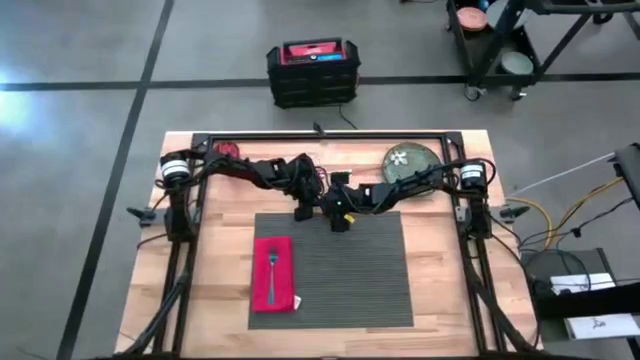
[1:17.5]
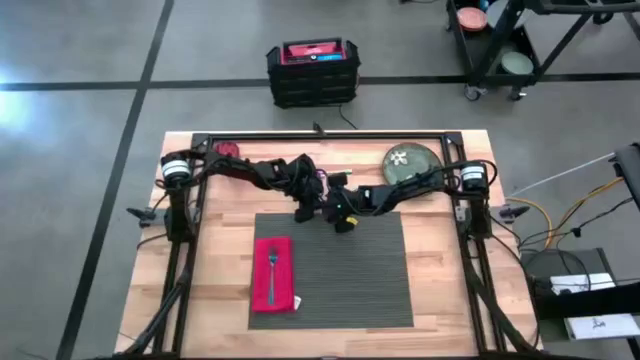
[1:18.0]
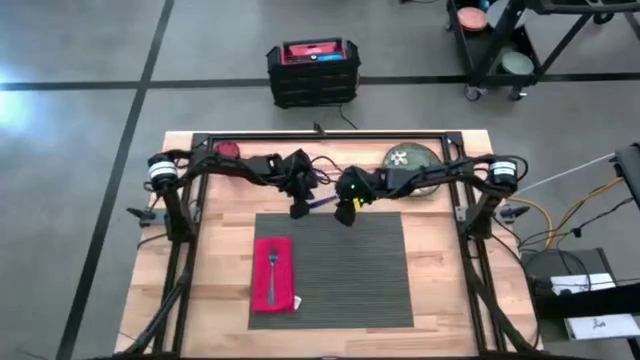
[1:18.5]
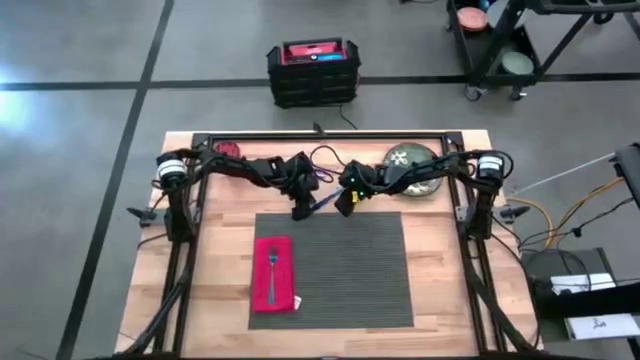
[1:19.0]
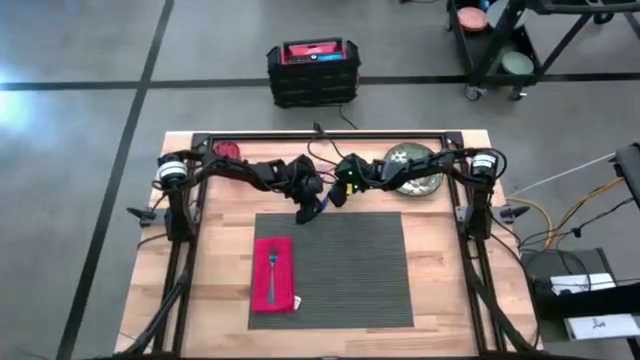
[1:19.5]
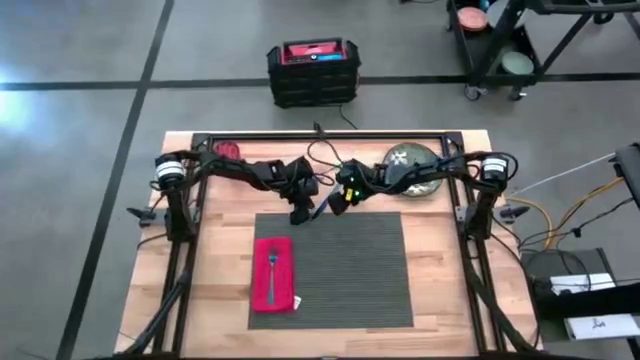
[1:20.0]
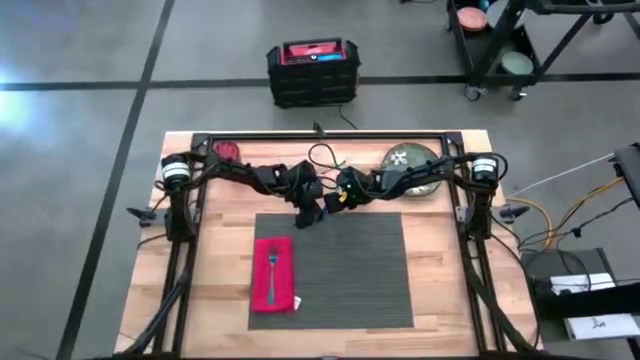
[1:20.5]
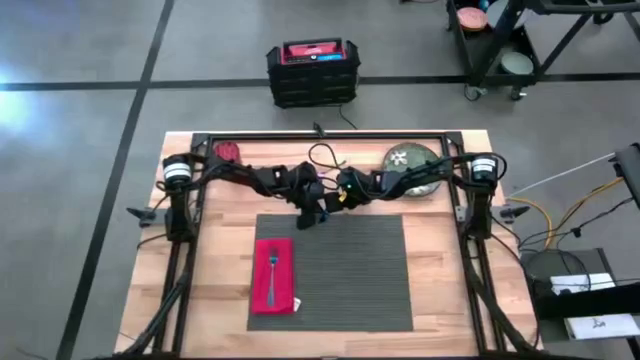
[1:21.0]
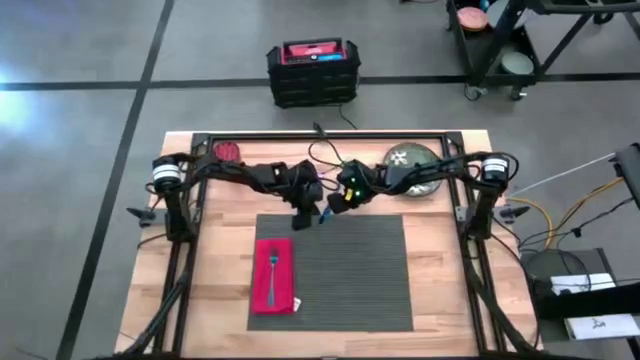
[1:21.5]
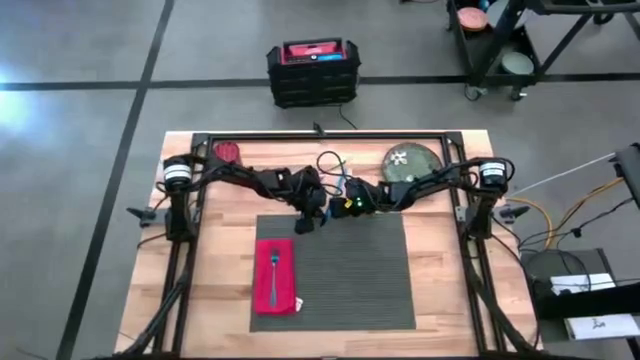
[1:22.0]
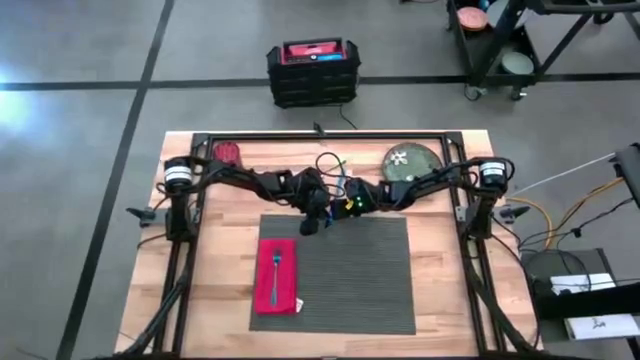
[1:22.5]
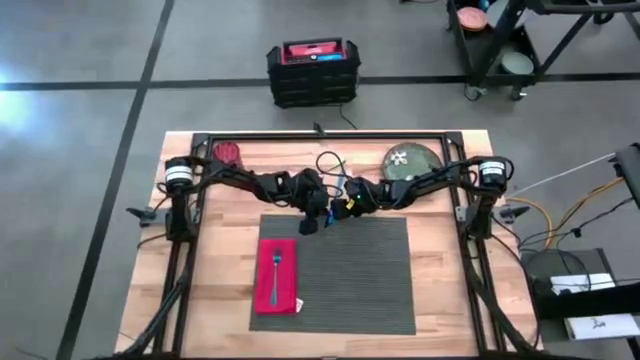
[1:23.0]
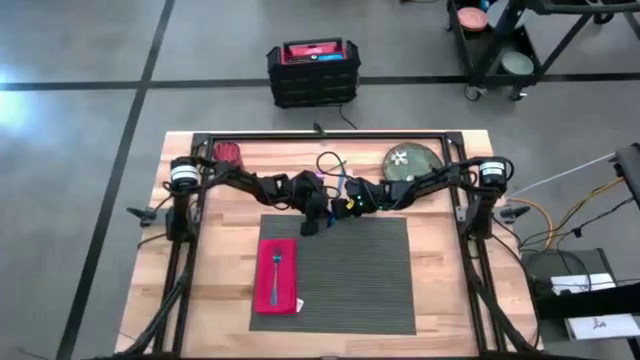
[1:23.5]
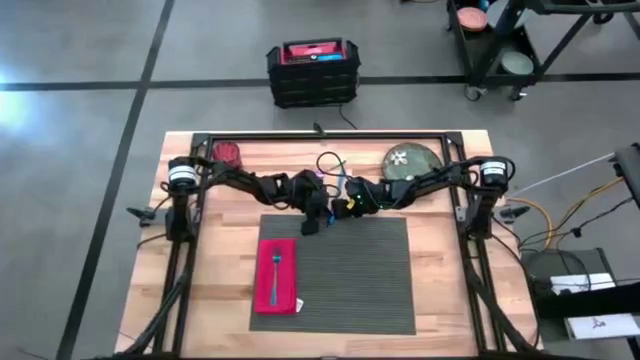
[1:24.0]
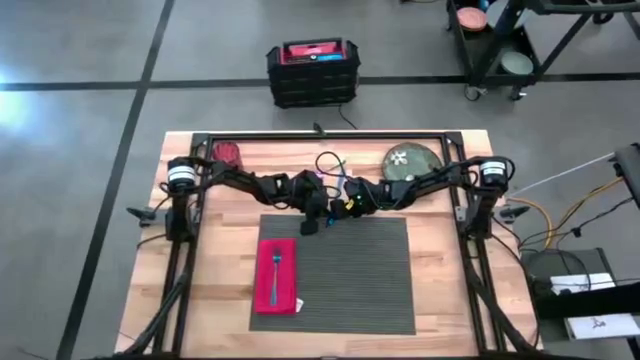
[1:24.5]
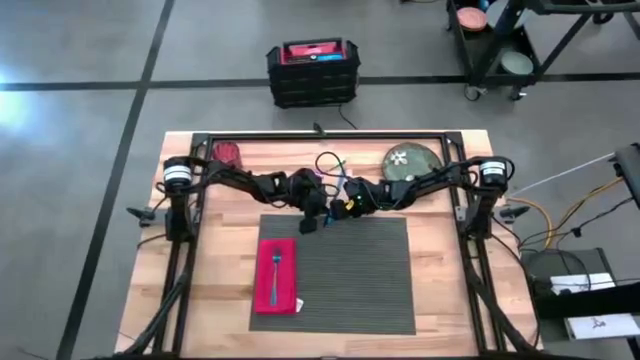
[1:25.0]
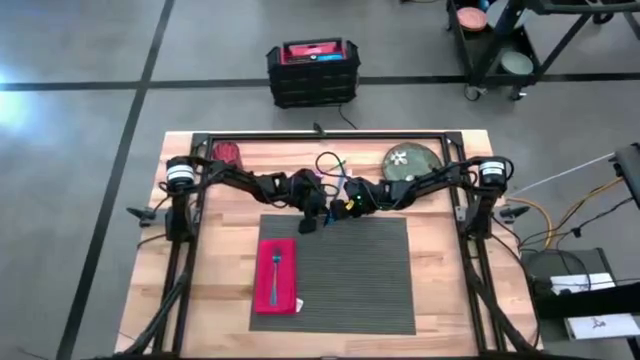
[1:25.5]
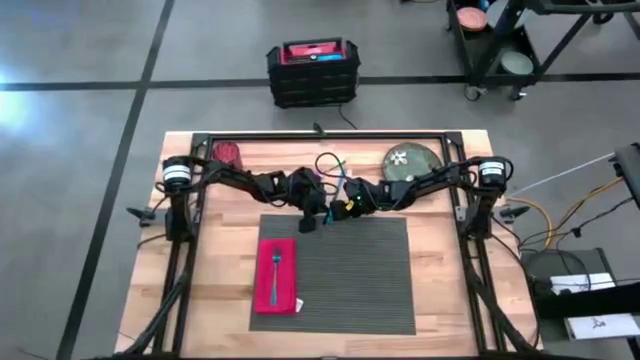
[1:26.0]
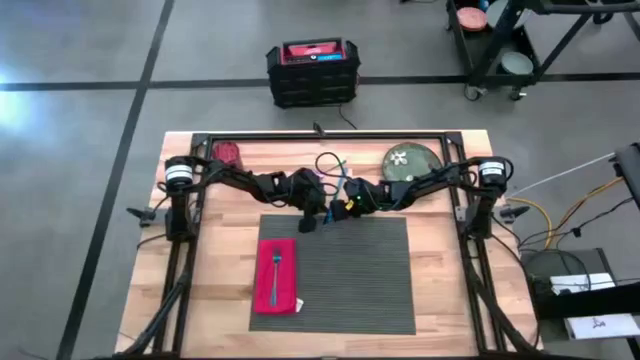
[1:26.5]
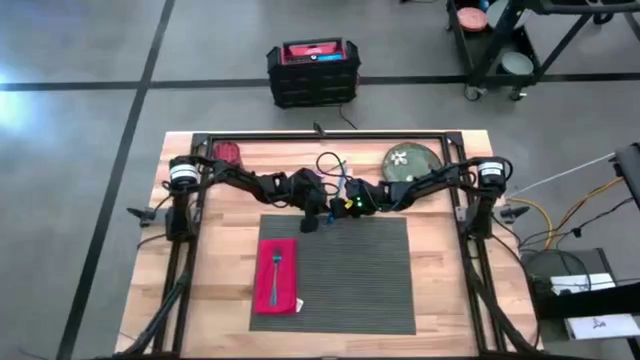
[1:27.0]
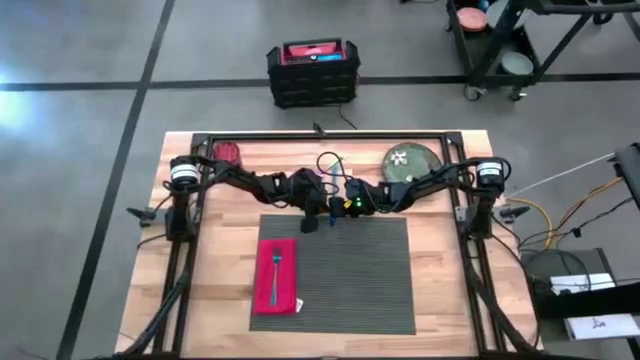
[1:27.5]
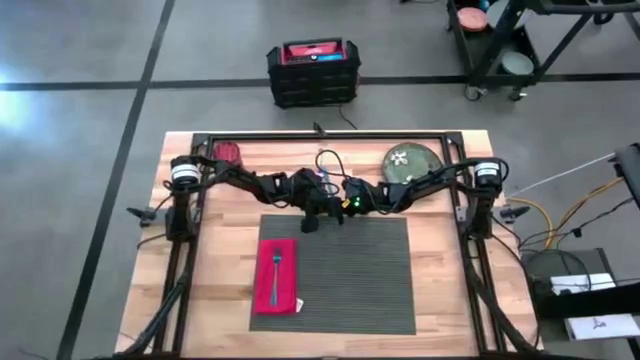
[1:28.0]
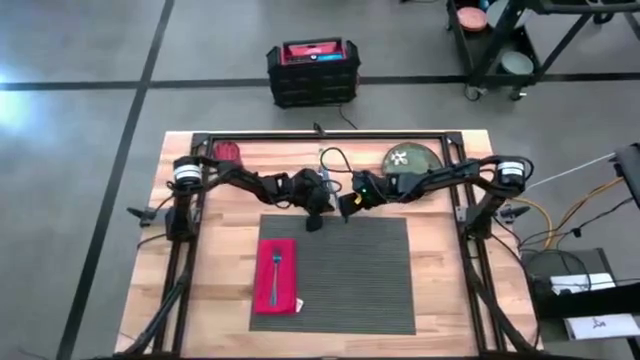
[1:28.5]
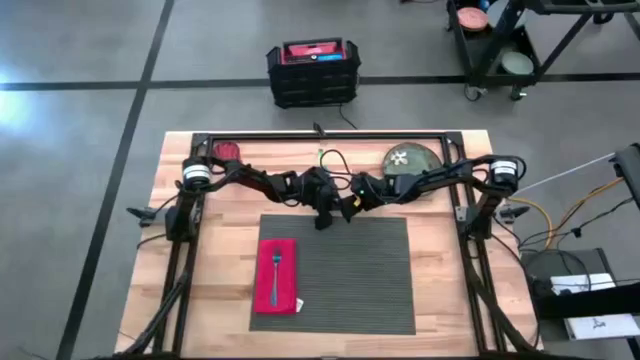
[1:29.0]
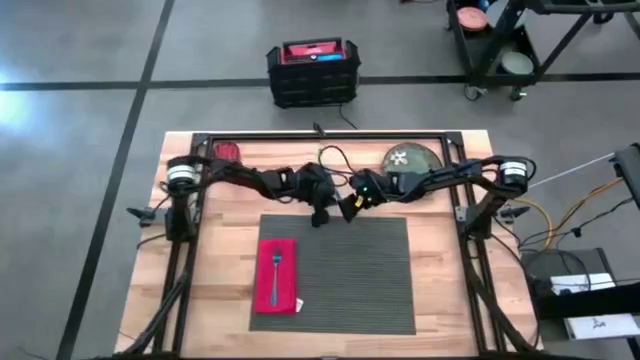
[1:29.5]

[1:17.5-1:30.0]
Task: Set table place
Put the blue knife on the right side of the table mat

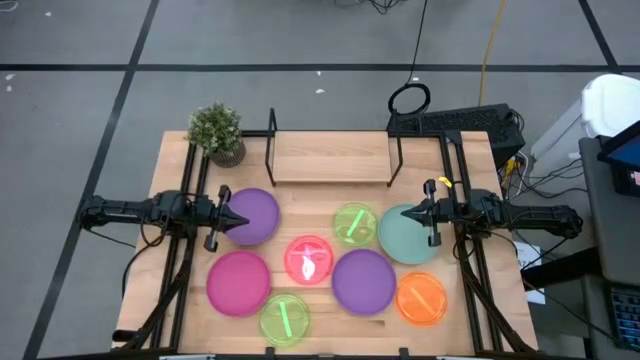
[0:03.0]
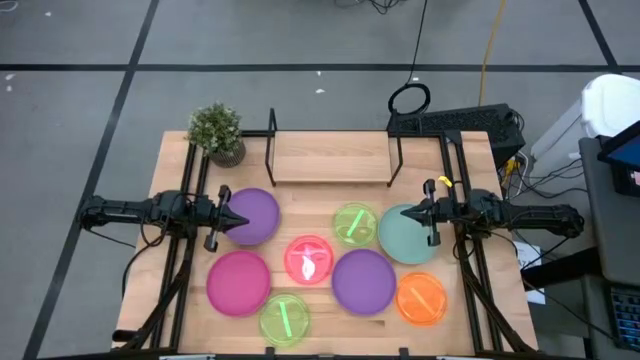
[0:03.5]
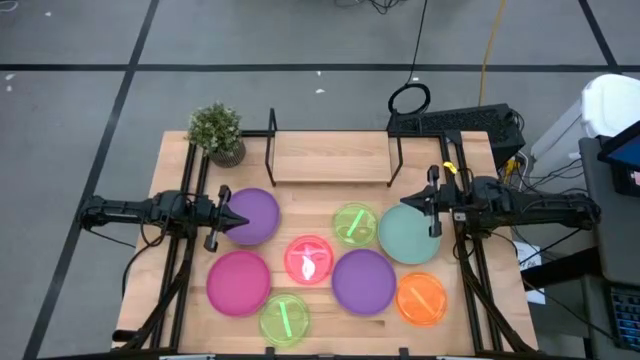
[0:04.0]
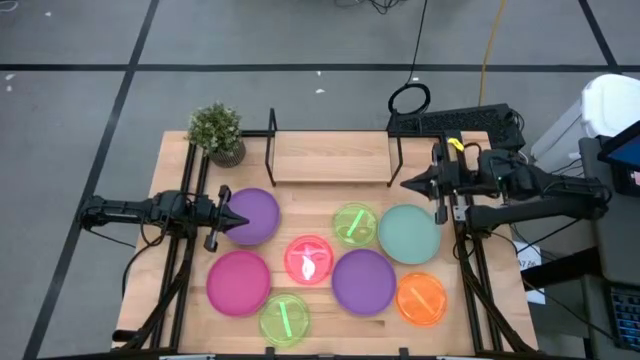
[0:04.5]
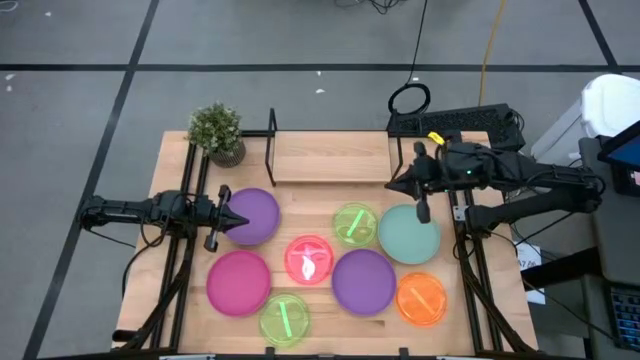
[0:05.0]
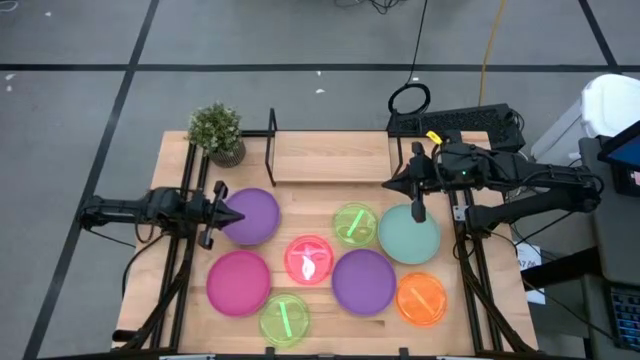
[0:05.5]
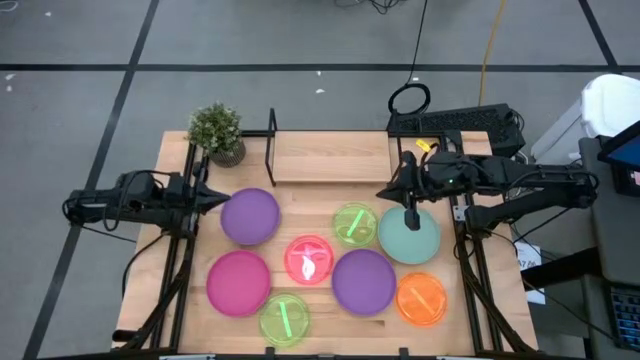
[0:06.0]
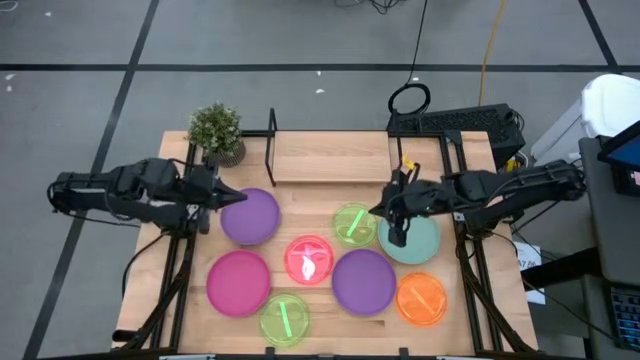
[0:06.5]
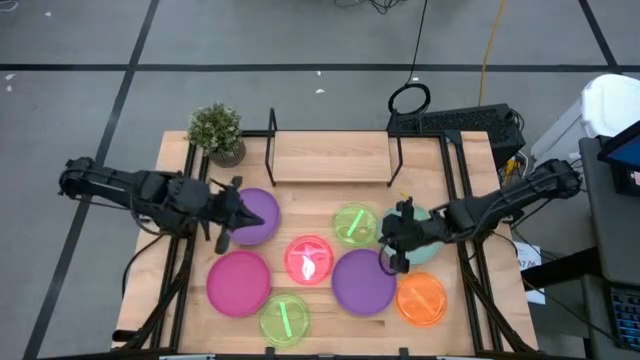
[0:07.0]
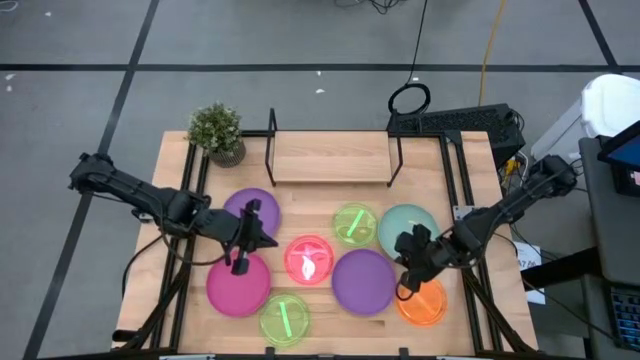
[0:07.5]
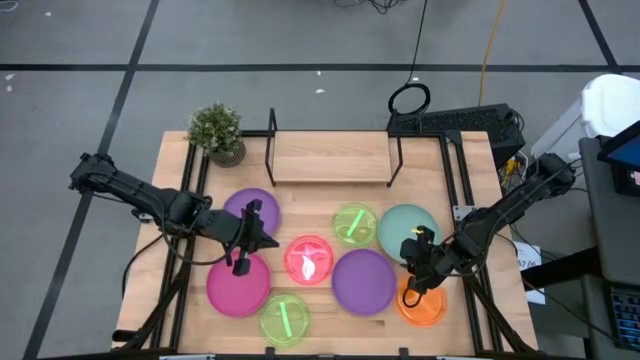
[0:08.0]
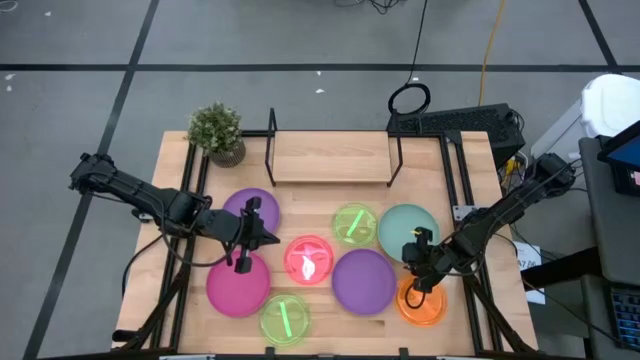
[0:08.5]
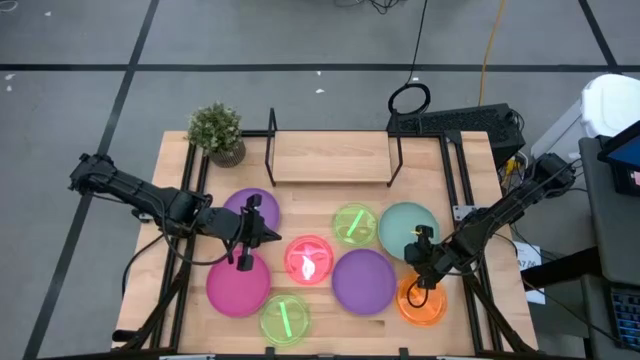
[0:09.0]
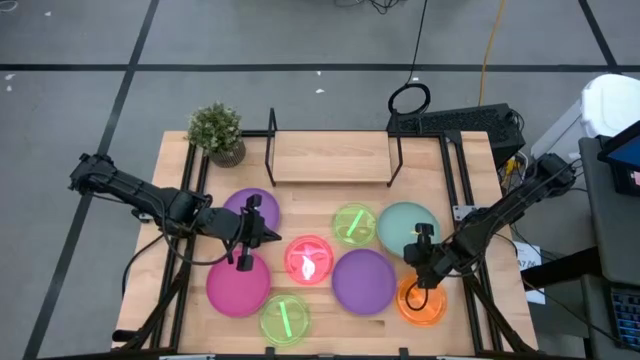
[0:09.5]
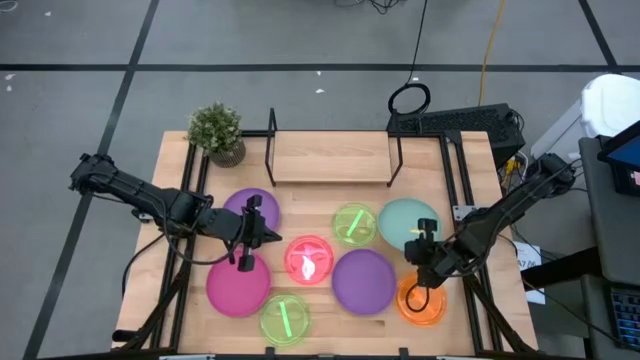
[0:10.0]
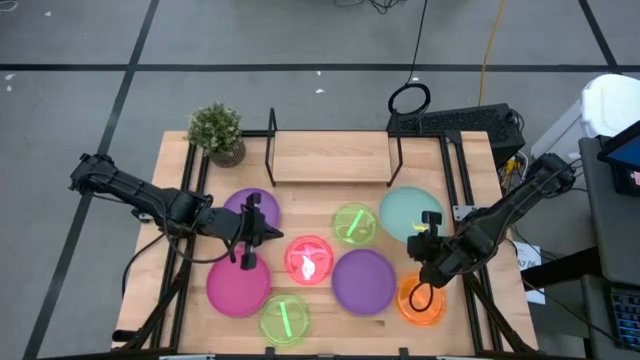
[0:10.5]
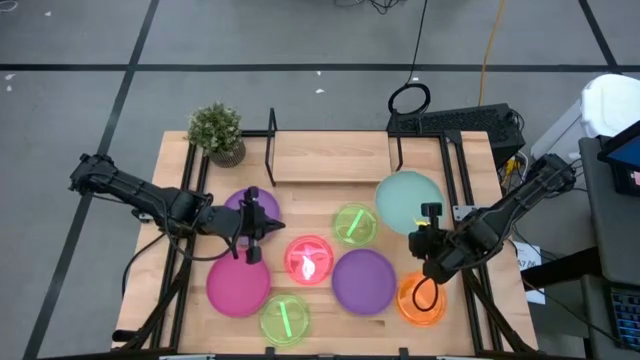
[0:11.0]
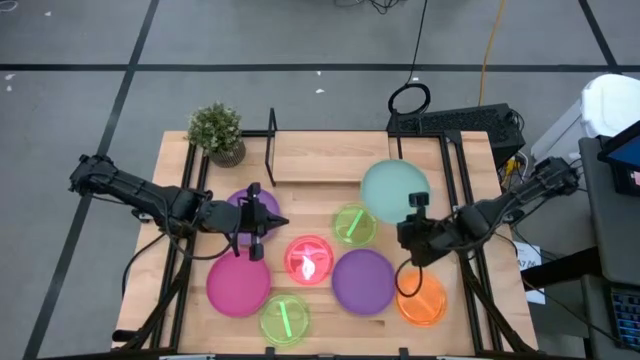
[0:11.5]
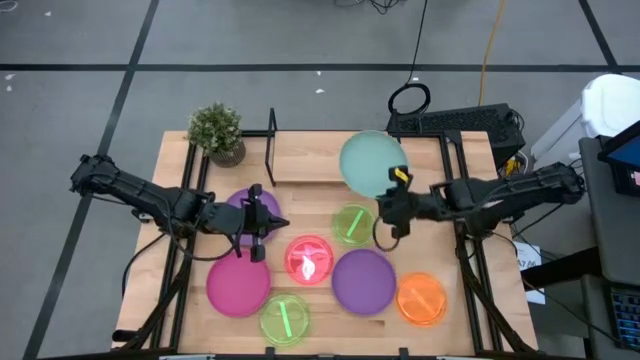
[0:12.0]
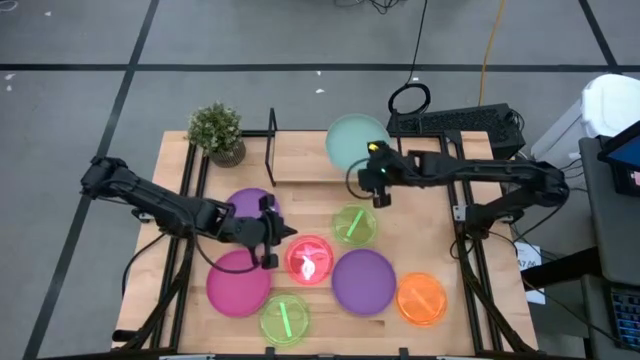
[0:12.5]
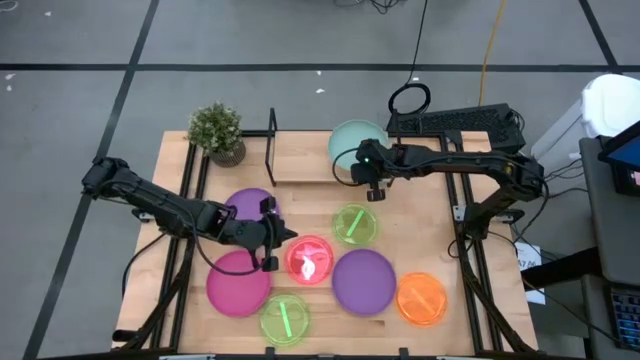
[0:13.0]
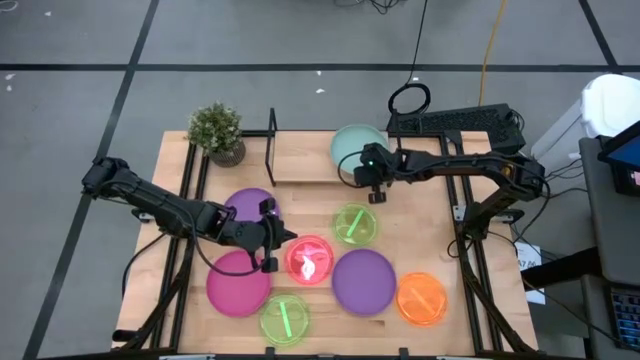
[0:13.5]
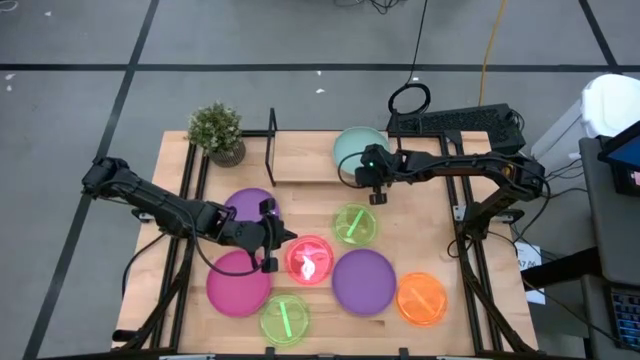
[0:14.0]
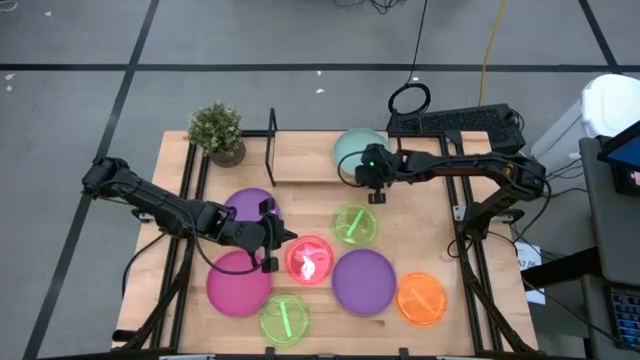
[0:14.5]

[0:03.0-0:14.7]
Task: Place and stack plates onto a shelf
Put the light blue plate on the shelf
